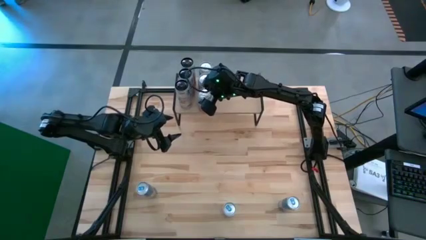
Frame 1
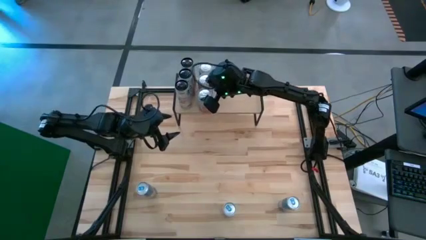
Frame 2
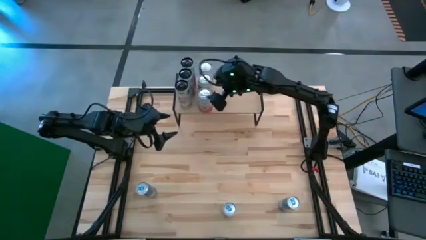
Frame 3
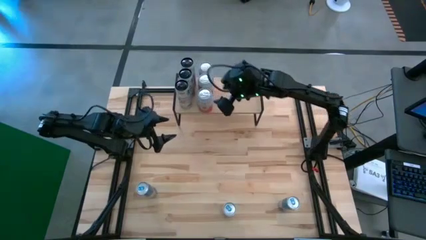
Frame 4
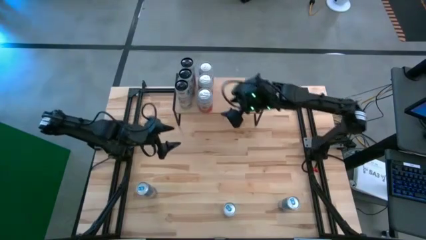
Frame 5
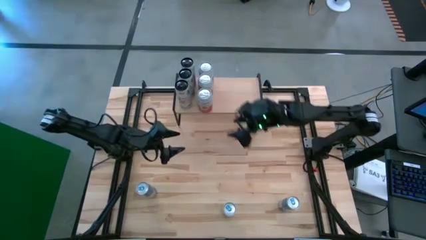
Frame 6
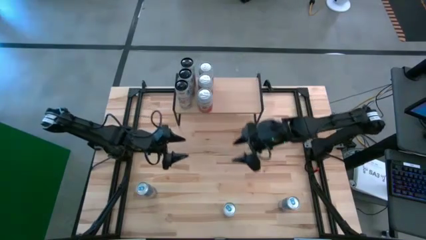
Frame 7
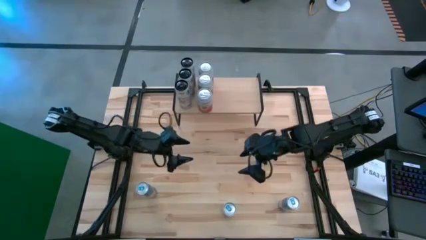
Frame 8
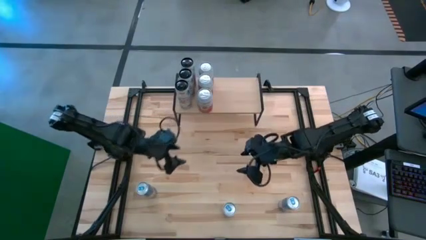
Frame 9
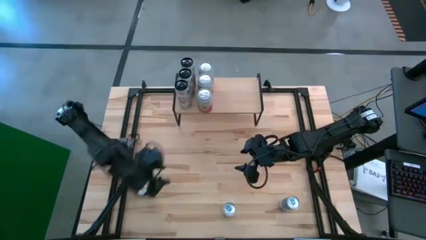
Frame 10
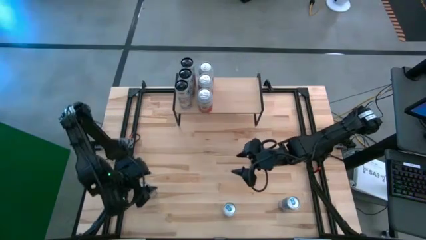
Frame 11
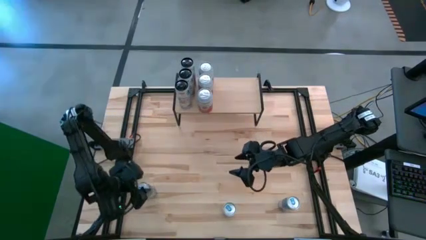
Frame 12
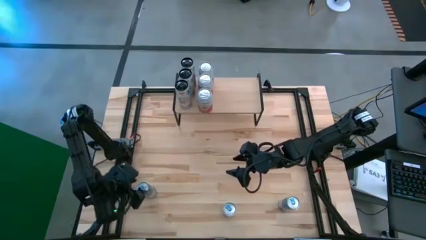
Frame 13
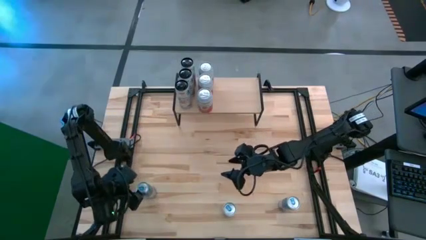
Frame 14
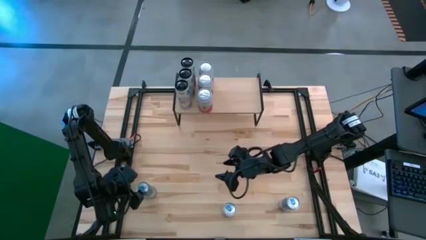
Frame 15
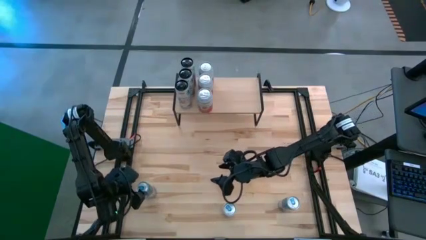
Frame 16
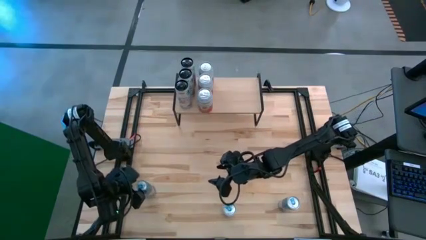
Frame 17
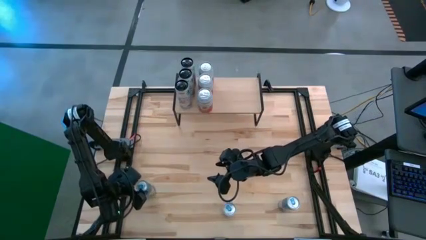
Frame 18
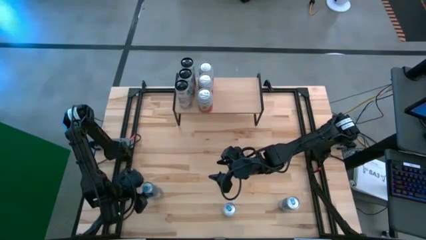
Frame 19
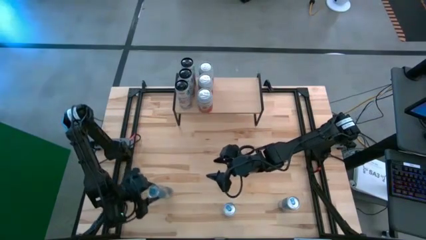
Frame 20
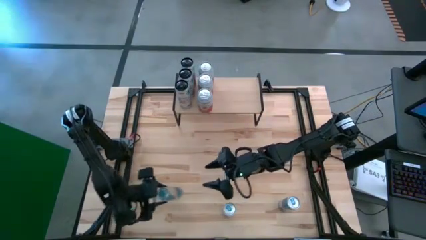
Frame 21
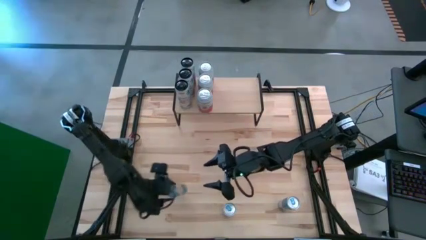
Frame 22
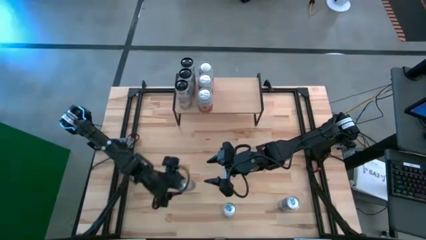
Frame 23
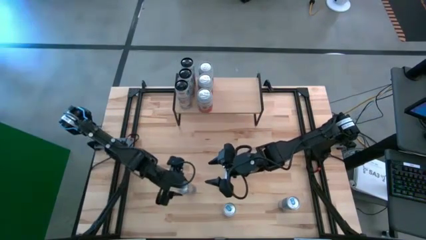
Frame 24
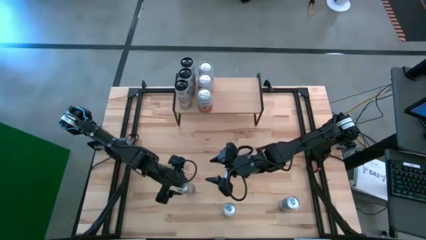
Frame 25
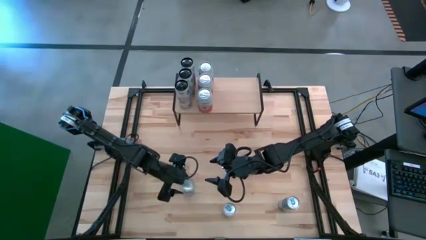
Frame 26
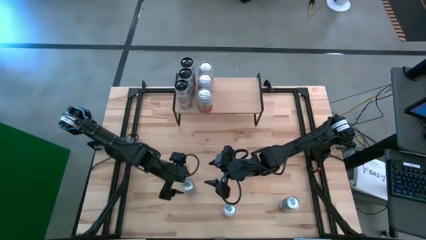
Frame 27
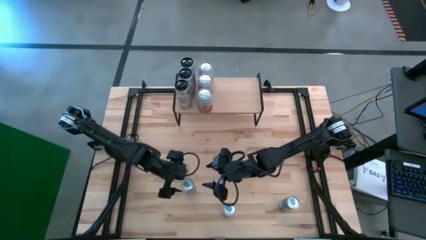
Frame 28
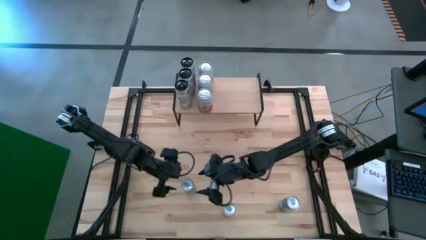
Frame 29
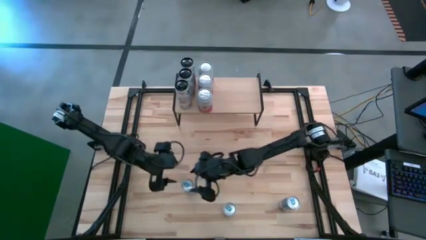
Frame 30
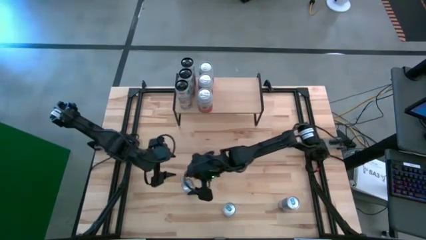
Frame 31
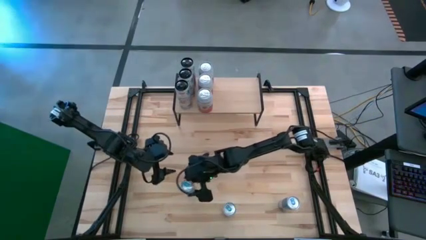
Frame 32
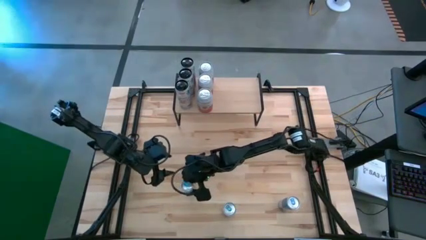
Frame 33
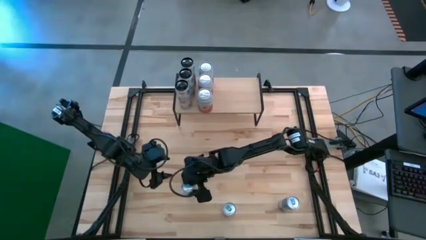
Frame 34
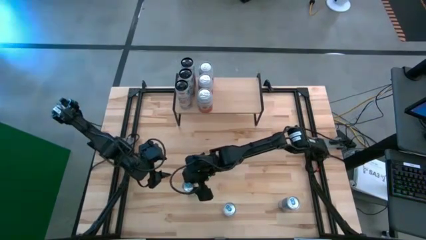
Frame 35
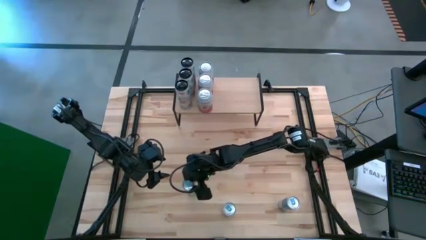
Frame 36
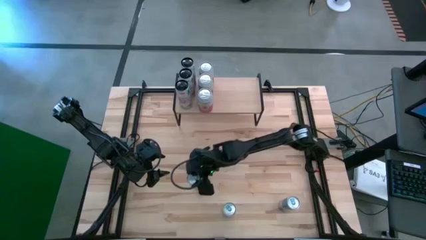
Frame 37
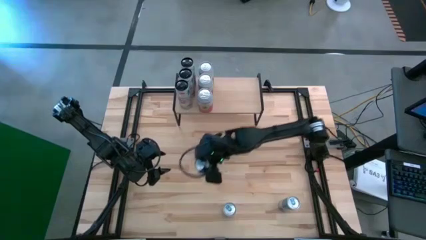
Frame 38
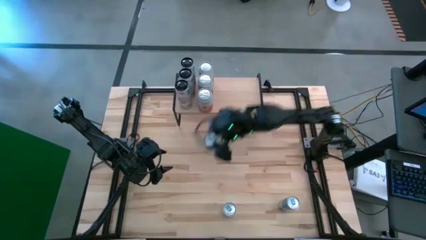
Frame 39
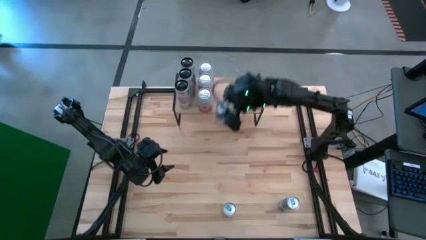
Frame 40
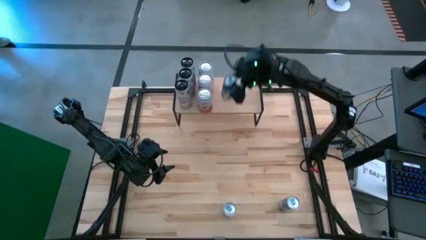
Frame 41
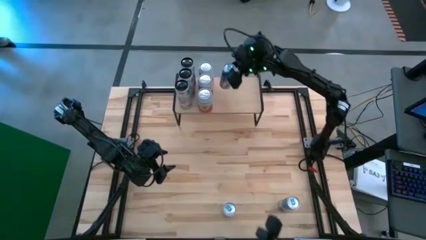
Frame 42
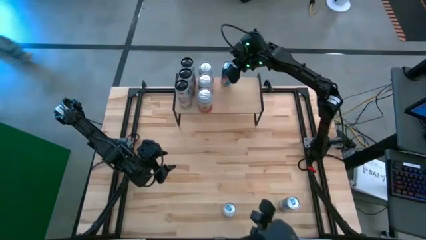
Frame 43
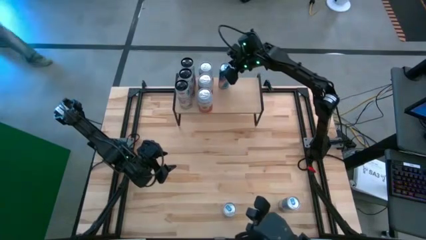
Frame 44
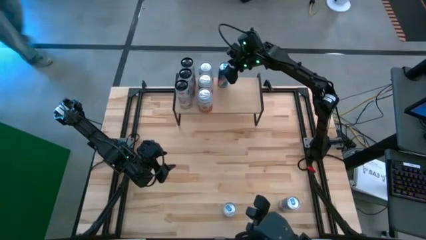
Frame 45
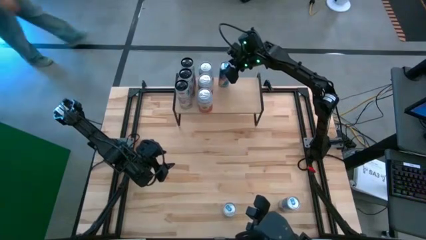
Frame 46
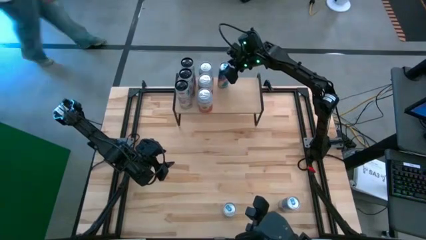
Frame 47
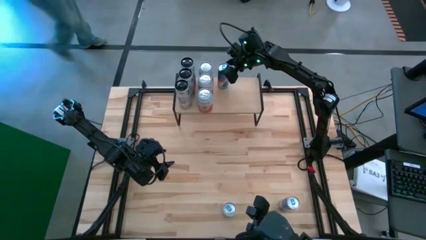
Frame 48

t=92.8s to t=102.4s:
Task: Place canned beverage on shelf
Put the top blue soda can on the shelf
